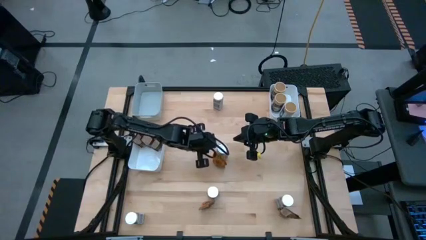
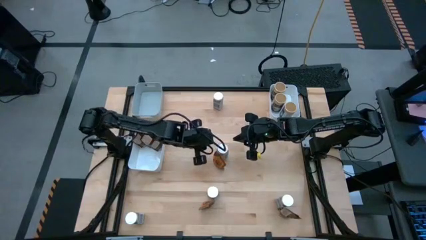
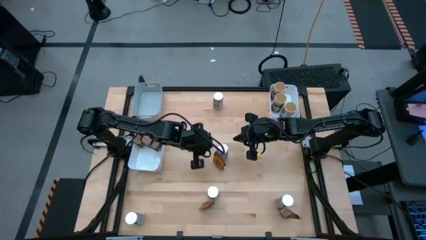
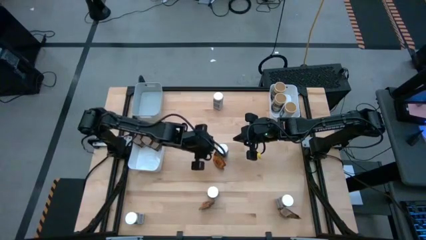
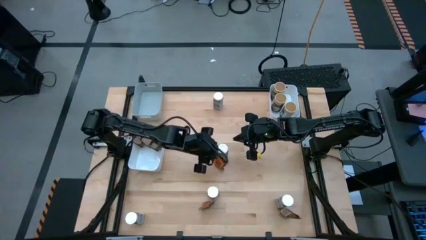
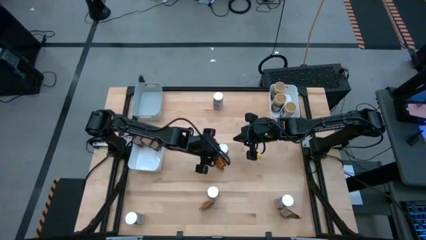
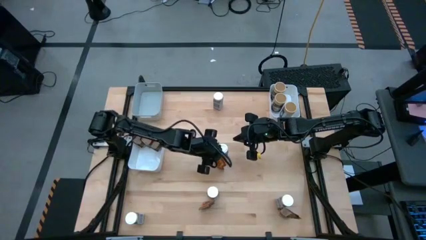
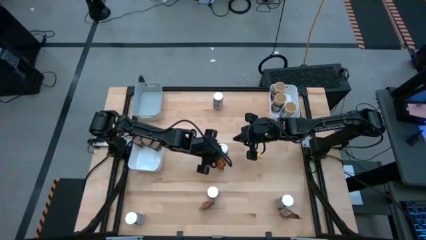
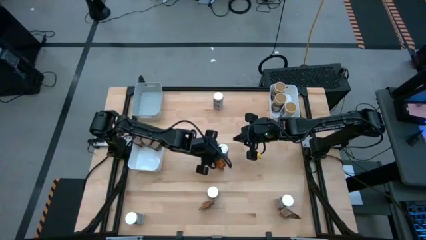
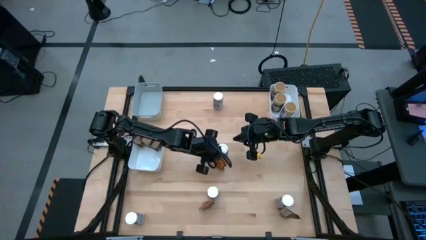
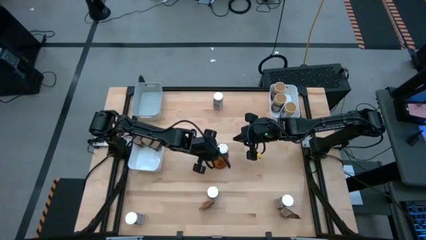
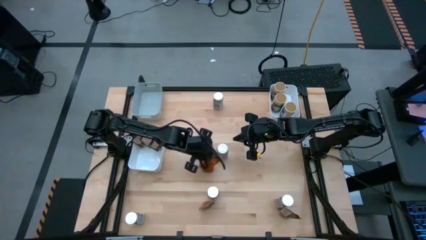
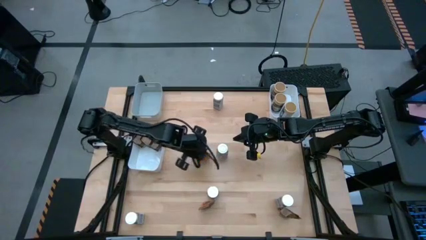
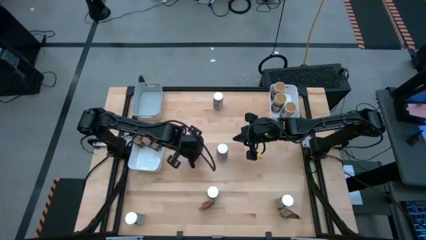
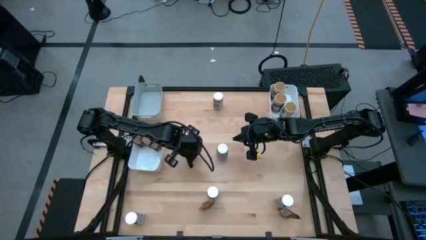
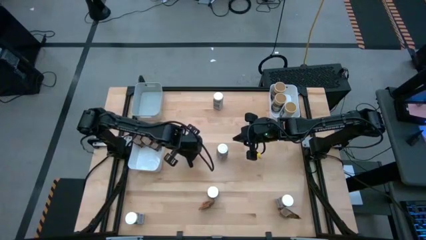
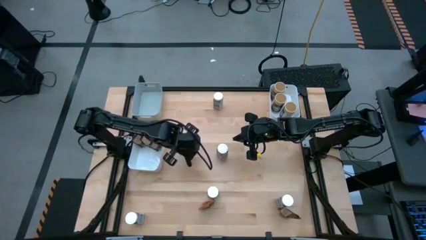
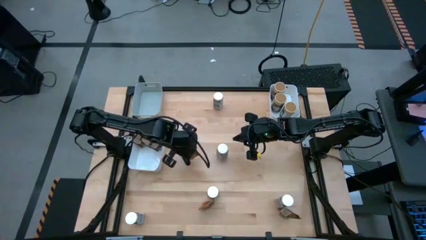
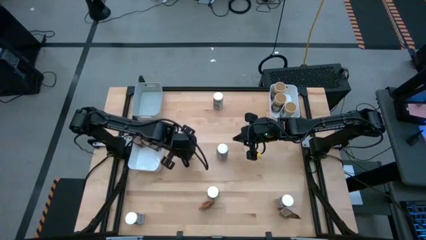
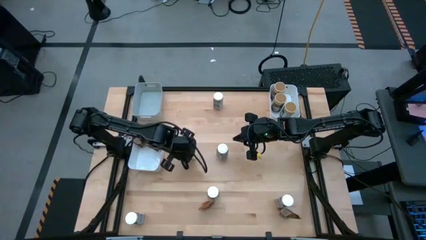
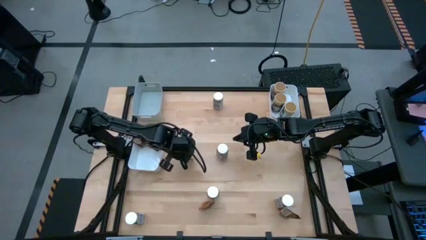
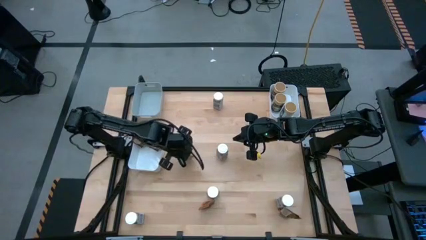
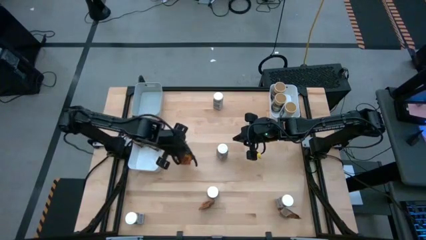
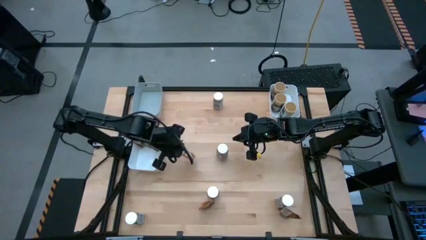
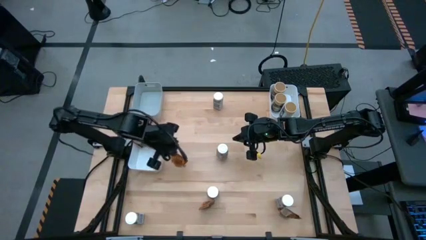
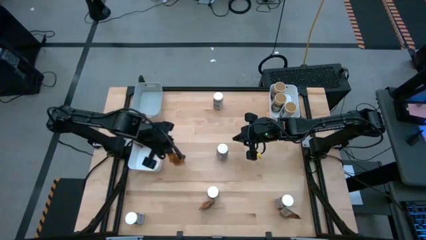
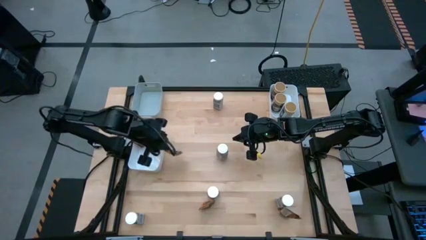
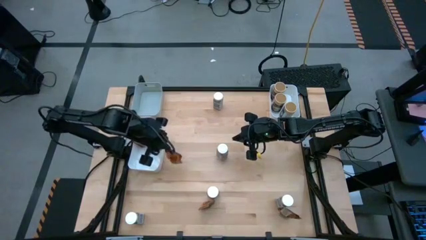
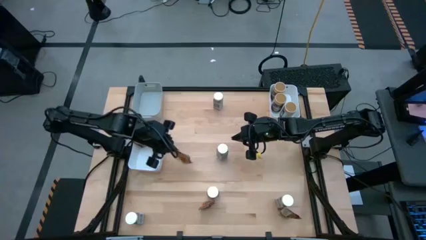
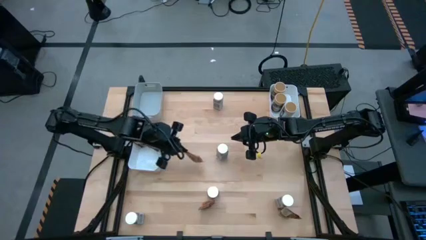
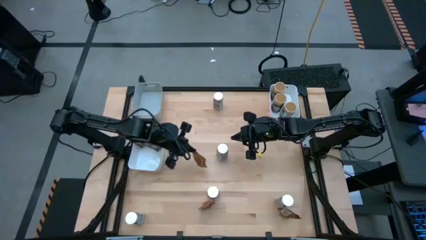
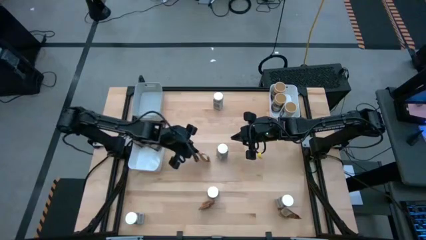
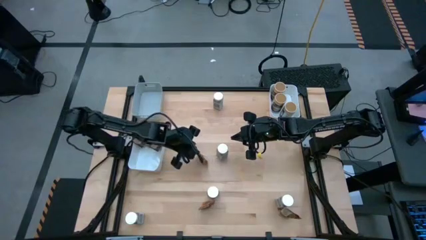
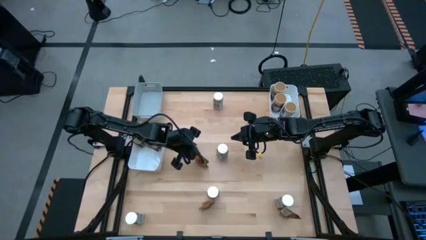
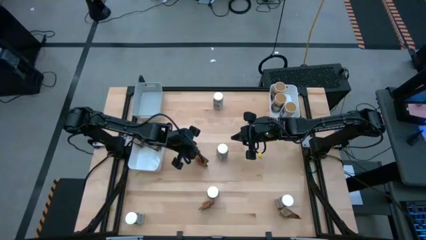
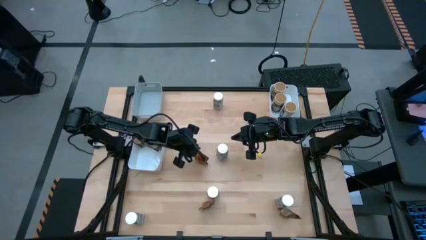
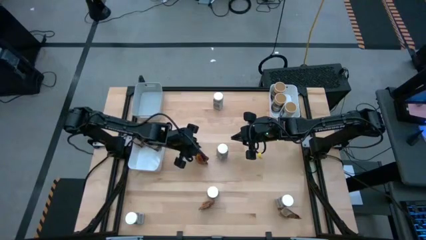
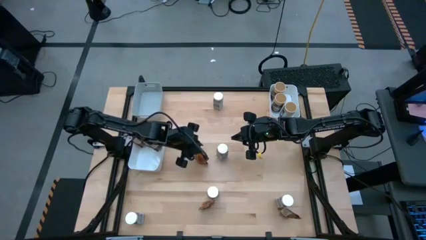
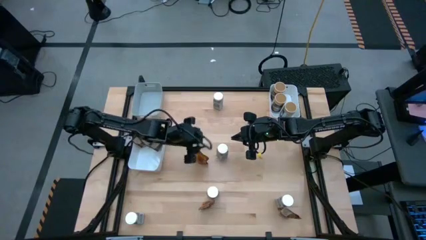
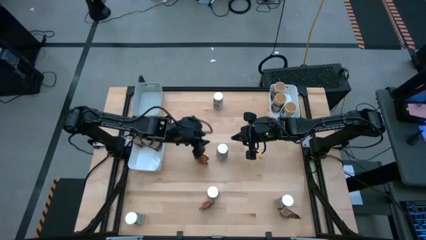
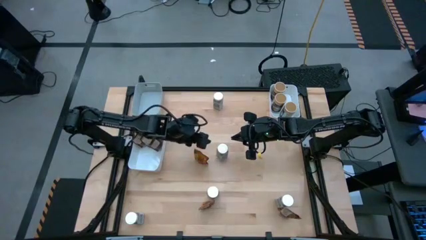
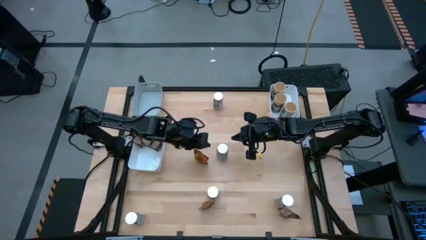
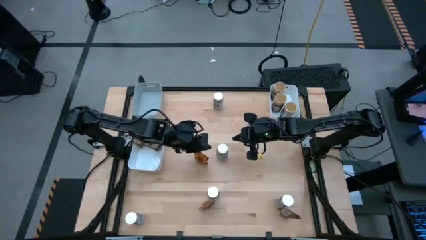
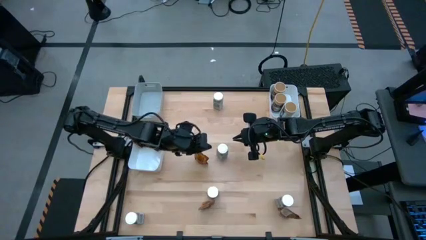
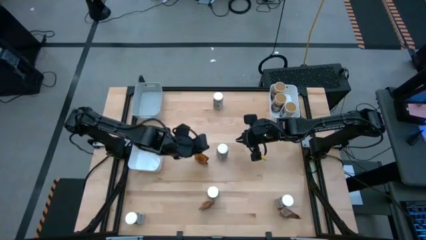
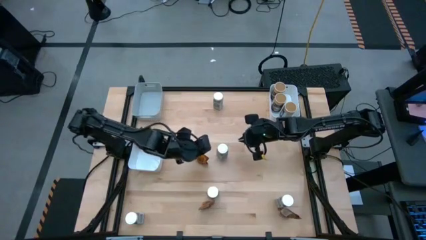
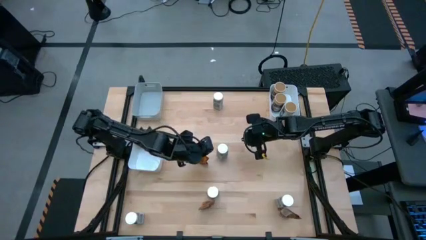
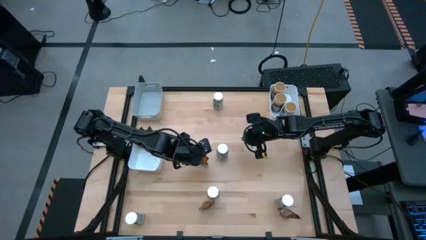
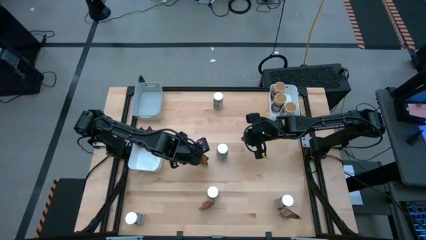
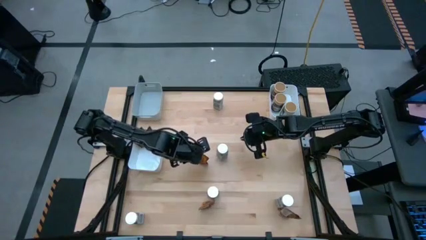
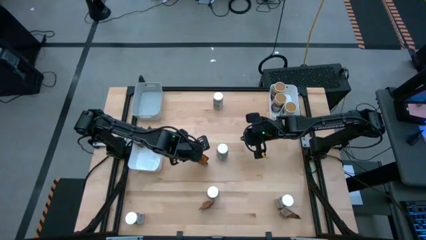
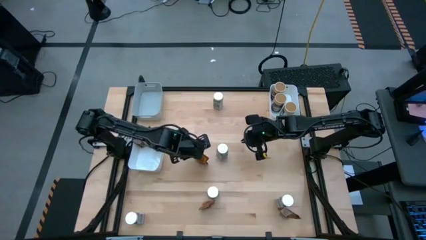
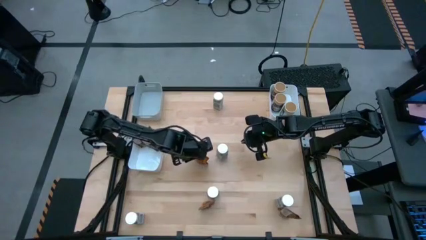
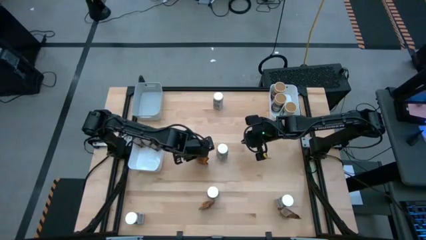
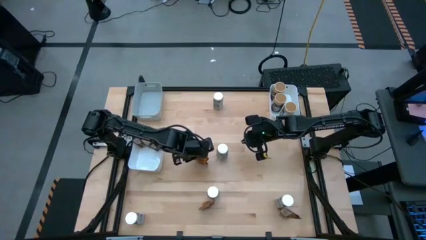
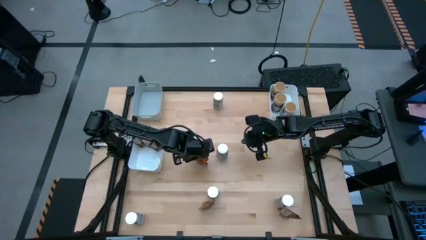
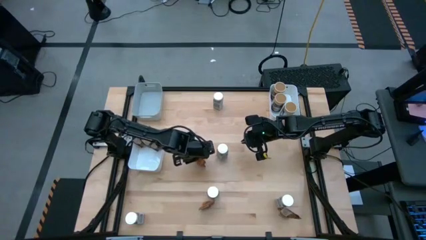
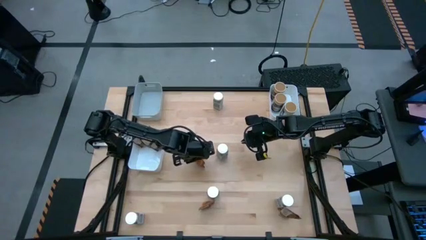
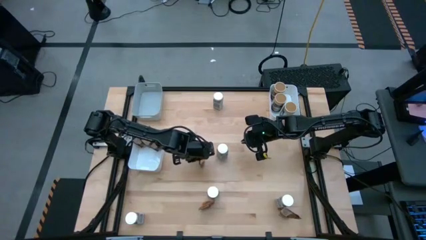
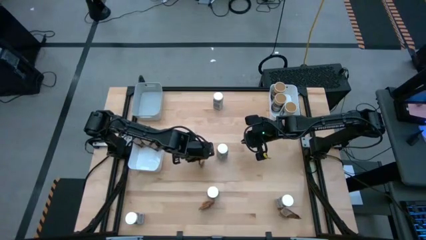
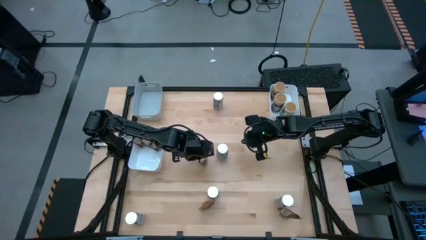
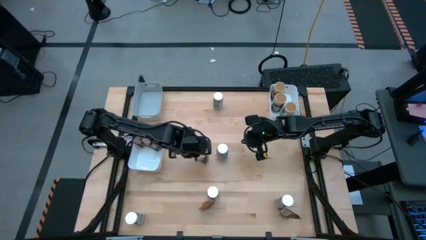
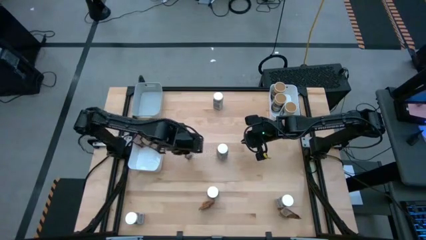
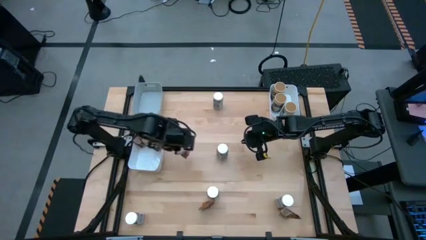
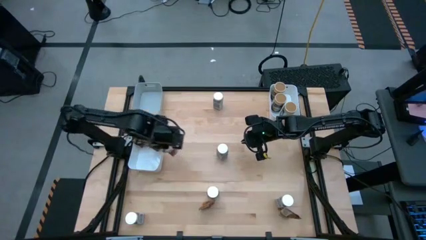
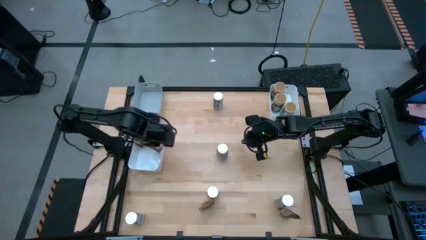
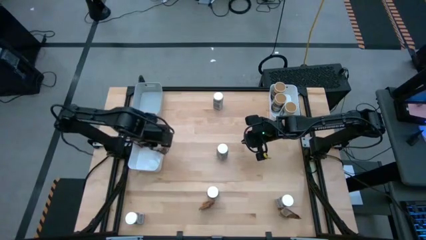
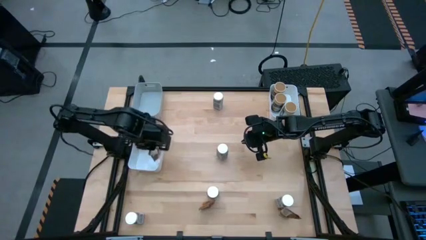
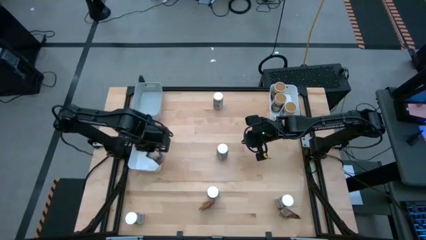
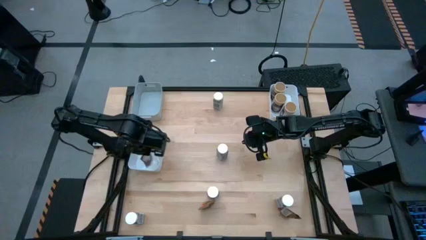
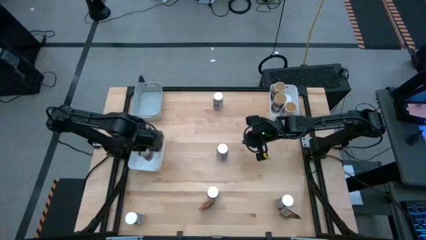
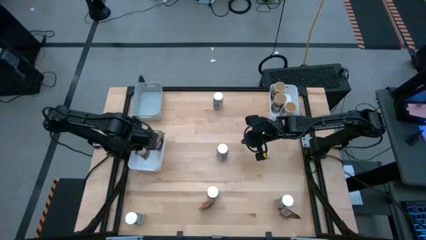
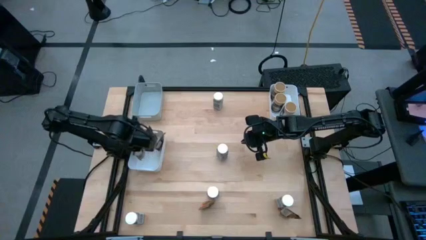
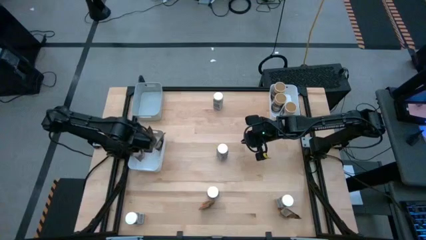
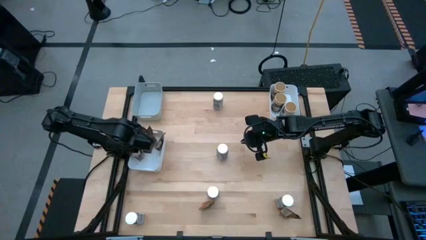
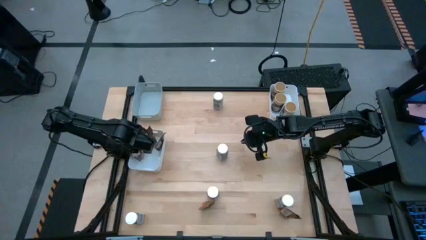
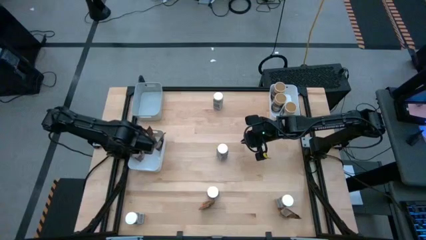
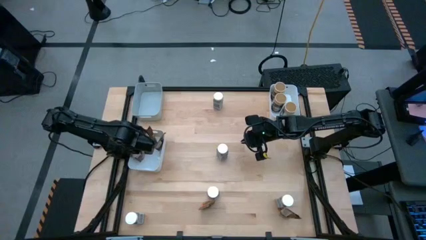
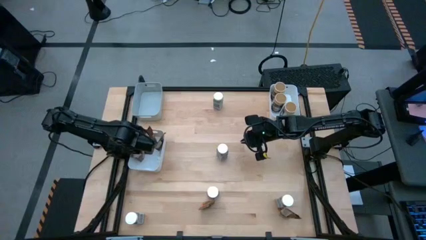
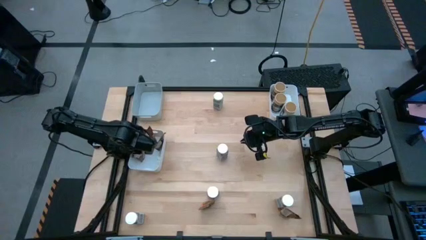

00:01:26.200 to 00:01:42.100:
Task: Sort spices by type
Put the orange seasoning pack into the left white bin
